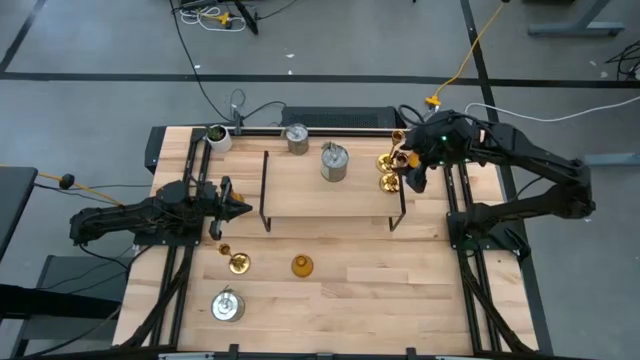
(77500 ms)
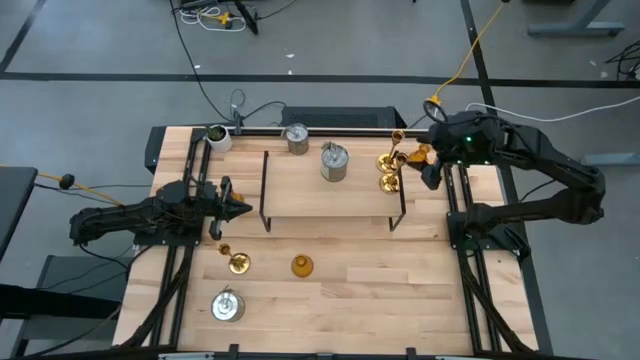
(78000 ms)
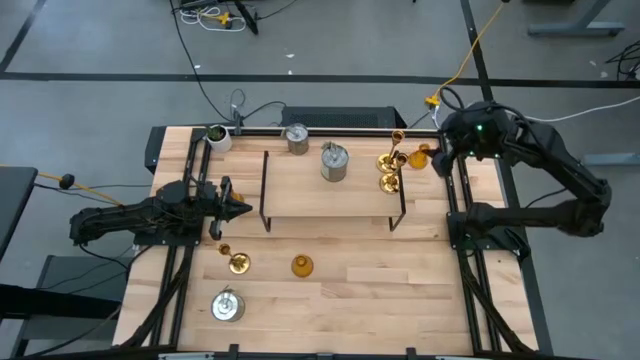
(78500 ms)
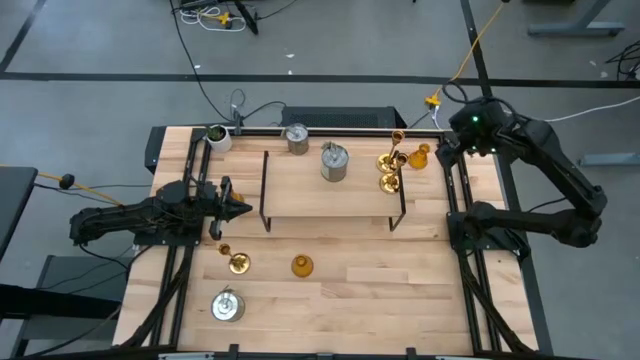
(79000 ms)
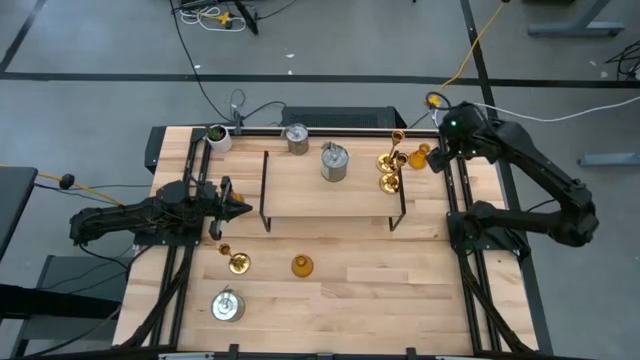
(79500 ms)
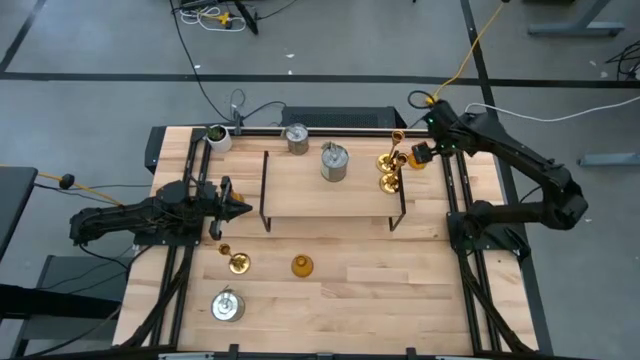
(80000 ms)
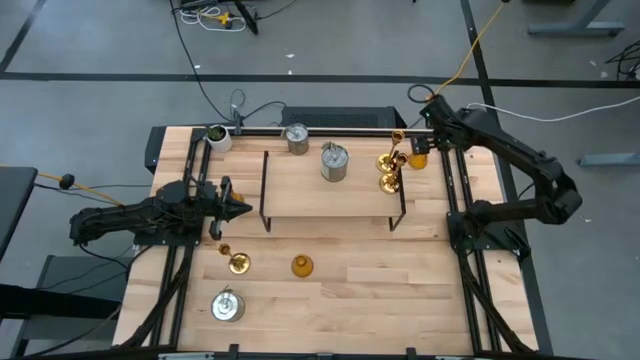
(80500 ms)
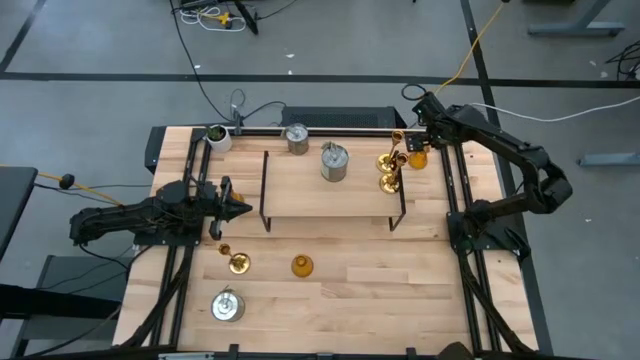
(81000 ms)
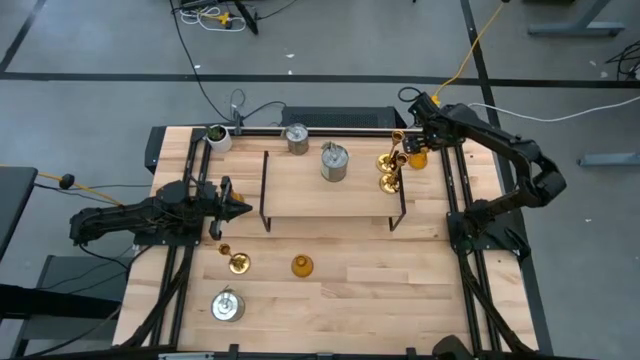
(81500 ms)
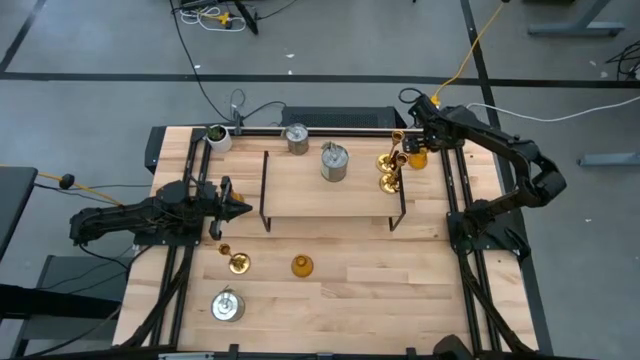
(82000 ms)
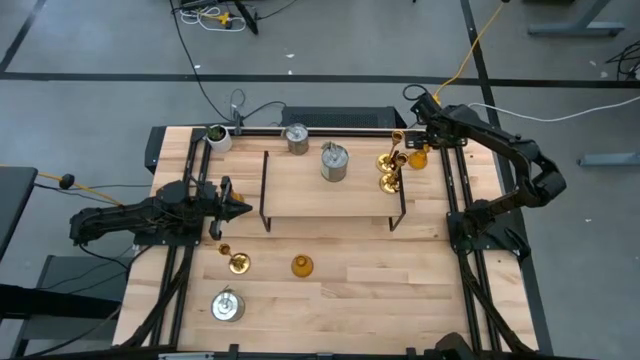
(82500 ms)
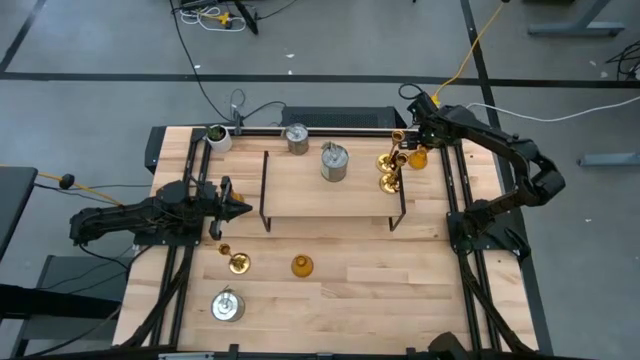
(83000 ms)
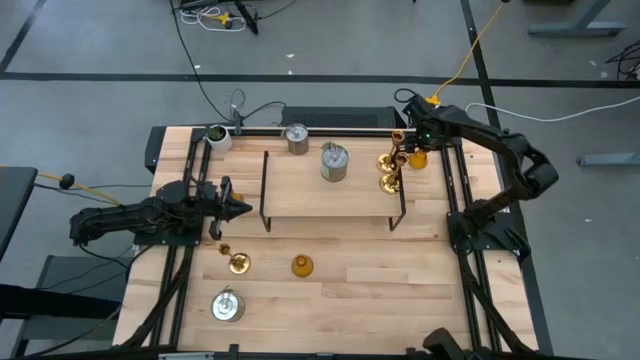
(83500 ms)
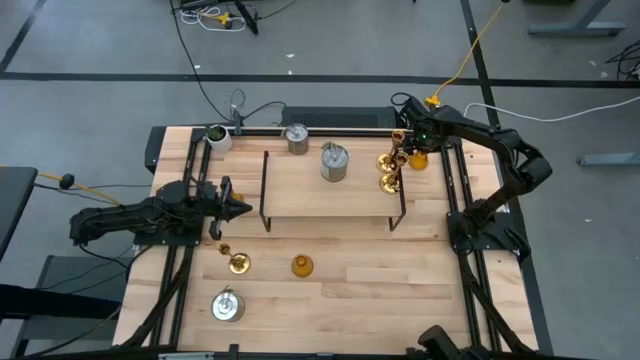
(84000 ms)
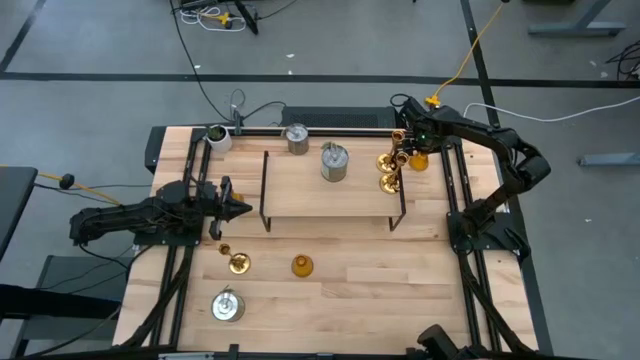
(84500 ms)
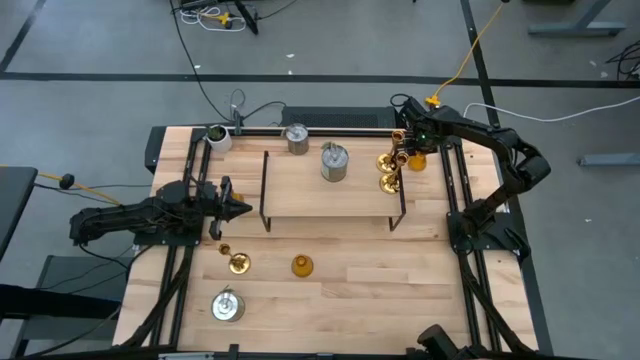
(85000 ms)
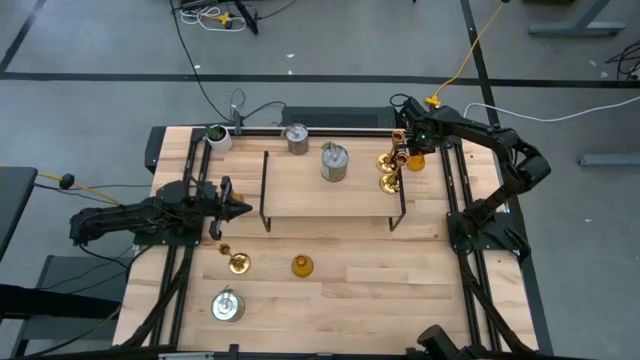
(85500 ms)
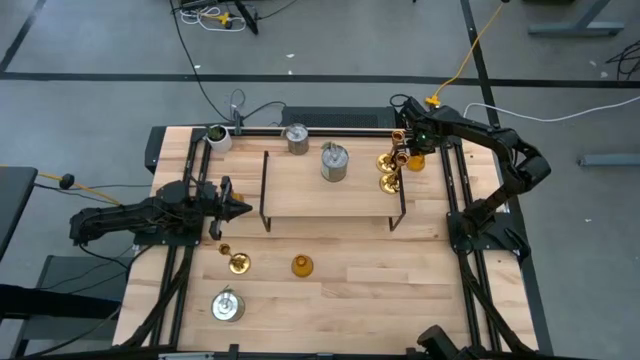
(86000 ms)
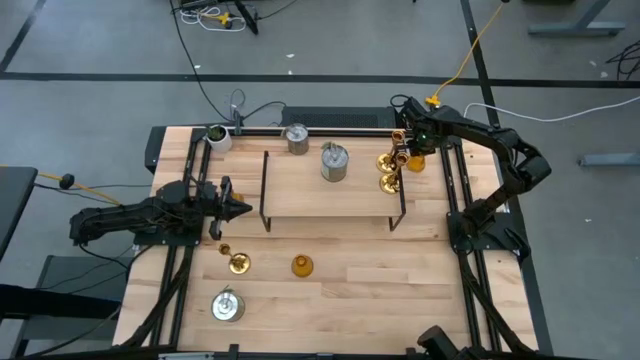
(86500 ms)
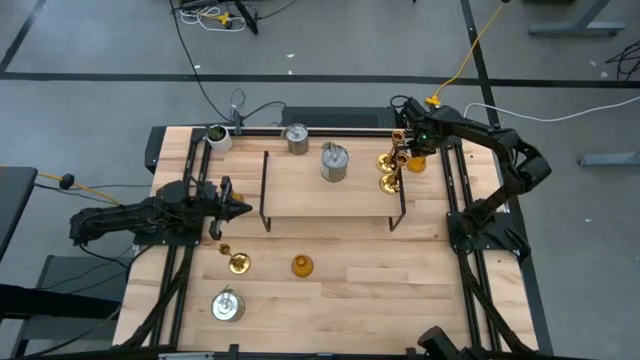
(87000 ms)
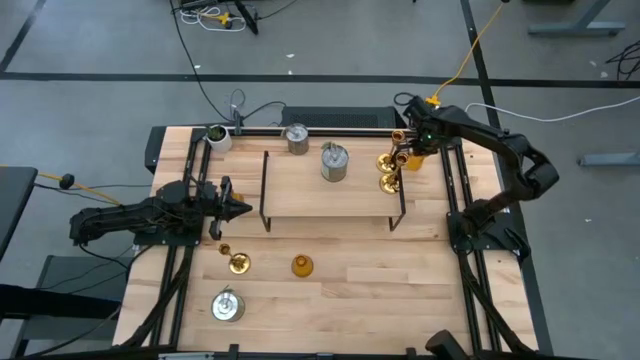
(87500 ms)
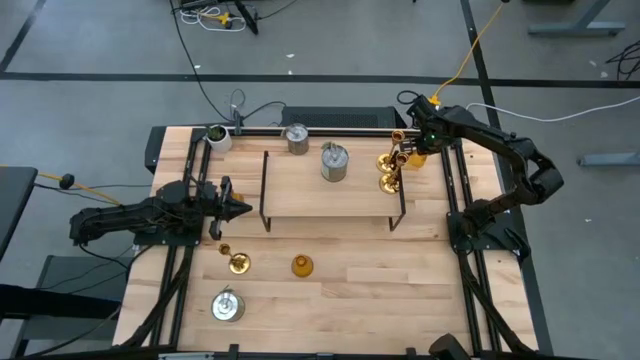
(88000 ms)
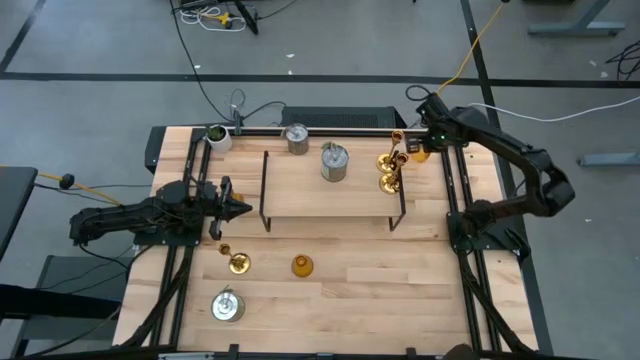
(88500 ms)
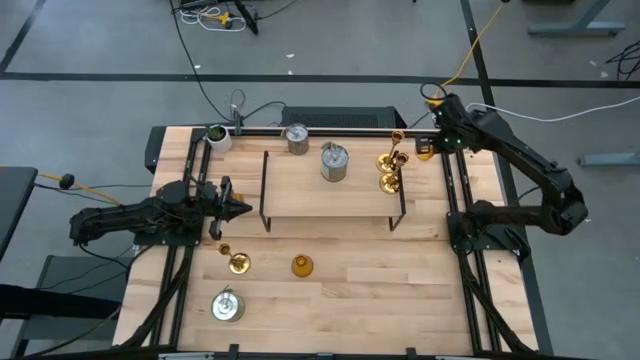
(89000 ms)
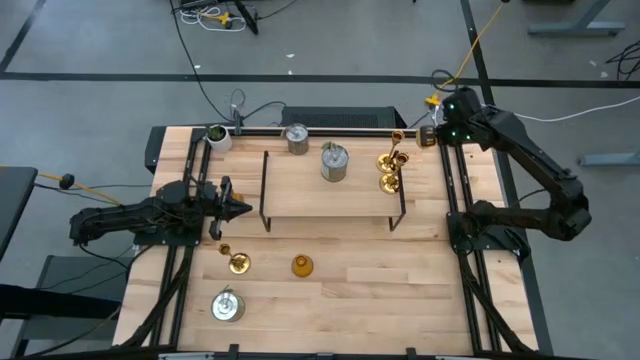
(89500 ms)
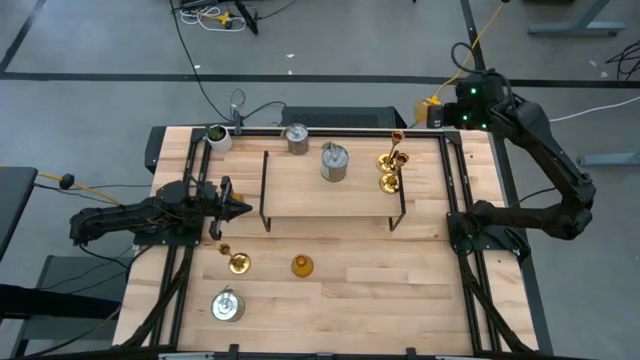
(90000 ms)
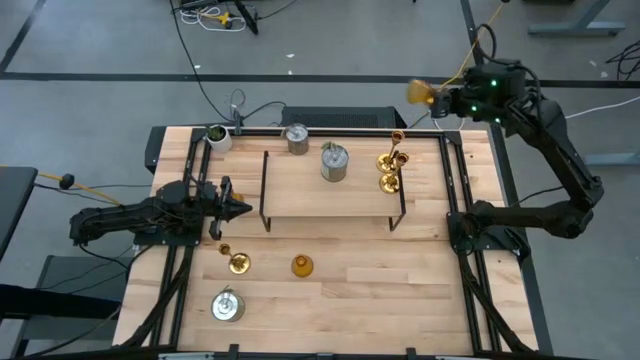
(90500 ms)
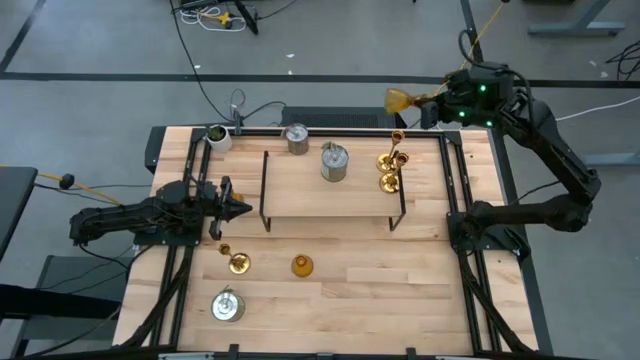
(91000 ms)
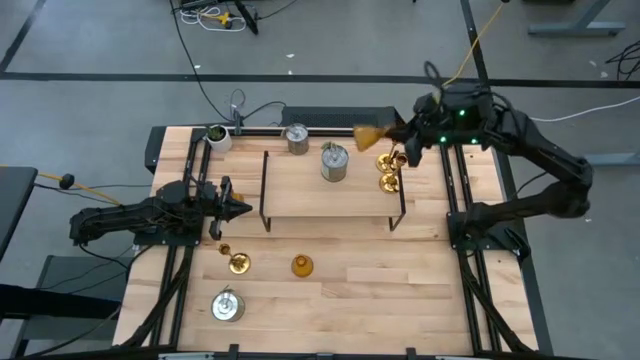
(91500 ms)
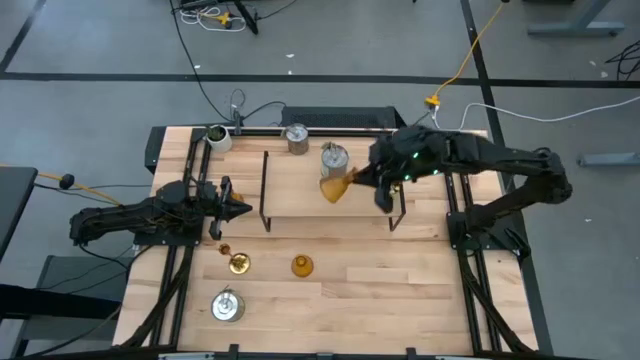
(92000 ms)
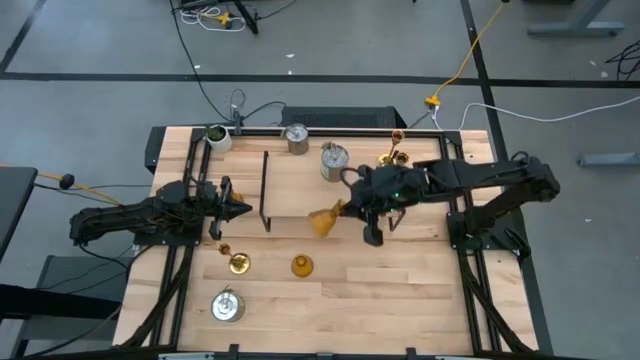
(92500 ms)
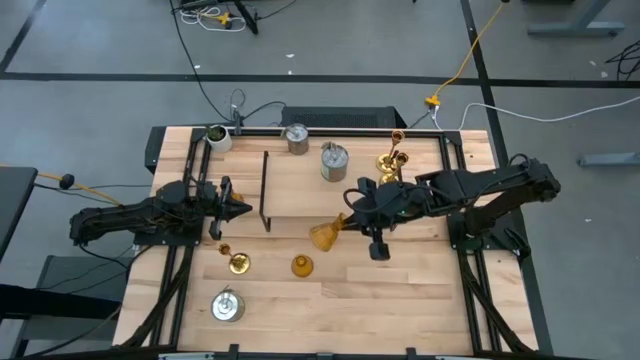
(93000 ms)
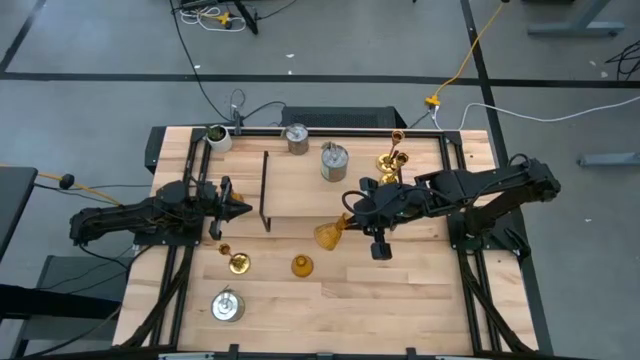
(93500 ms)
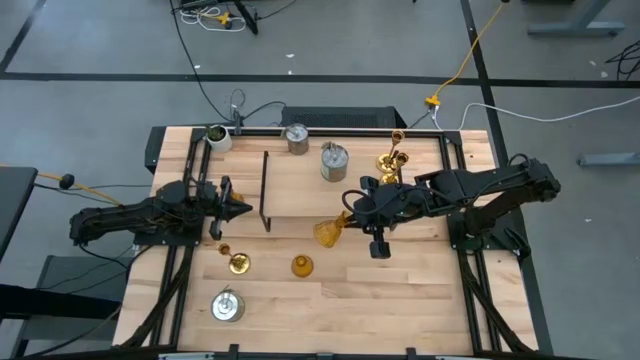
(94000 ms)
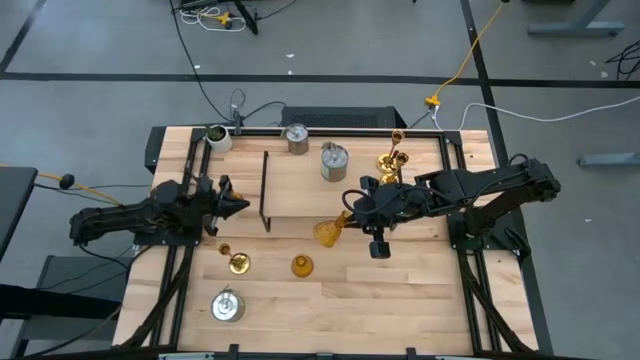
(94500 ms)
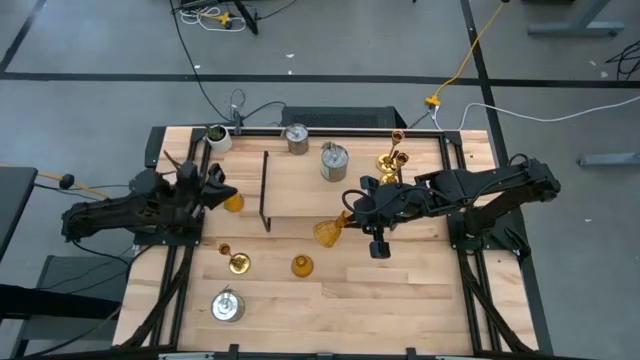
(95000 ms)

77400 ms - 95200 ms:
Task: Pick & Place candle stick holders
Put the top glass candle holder on the shelf

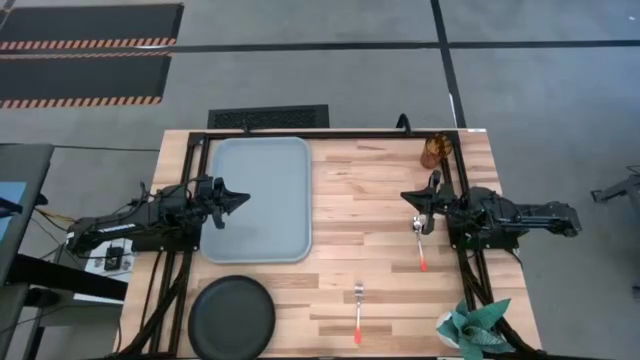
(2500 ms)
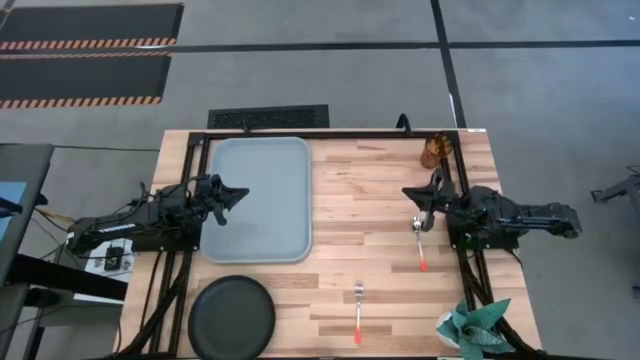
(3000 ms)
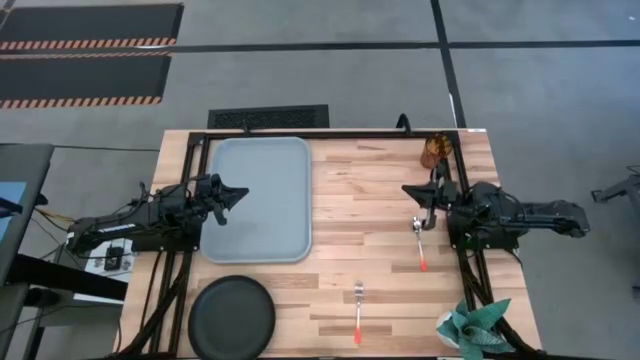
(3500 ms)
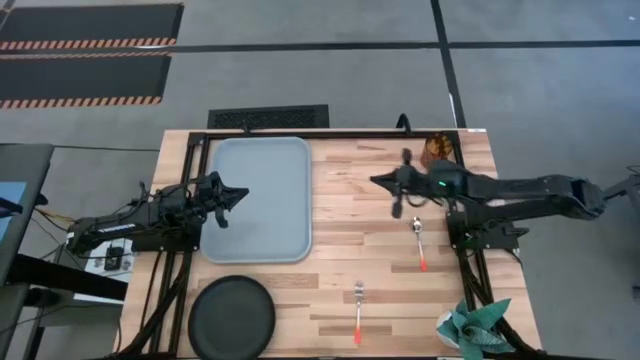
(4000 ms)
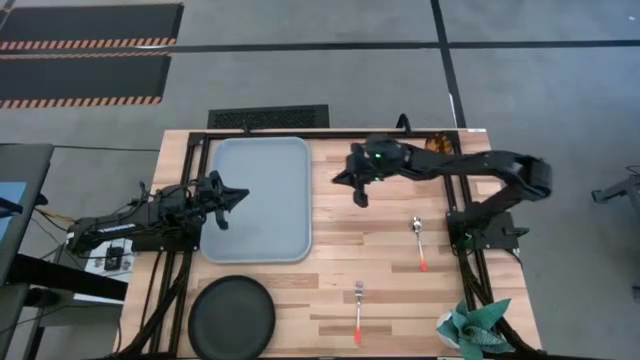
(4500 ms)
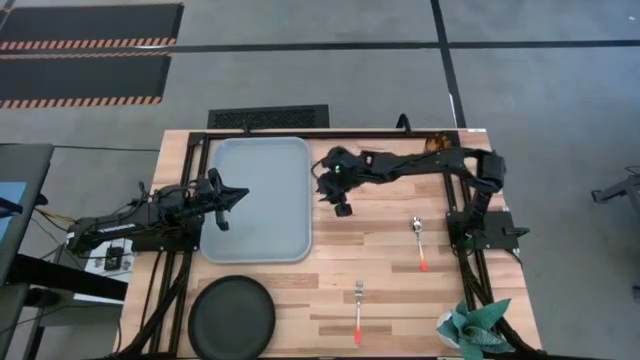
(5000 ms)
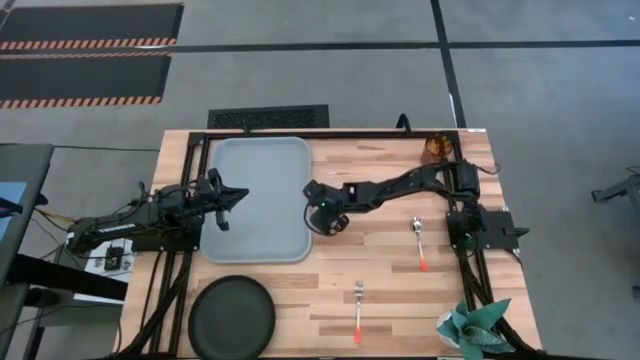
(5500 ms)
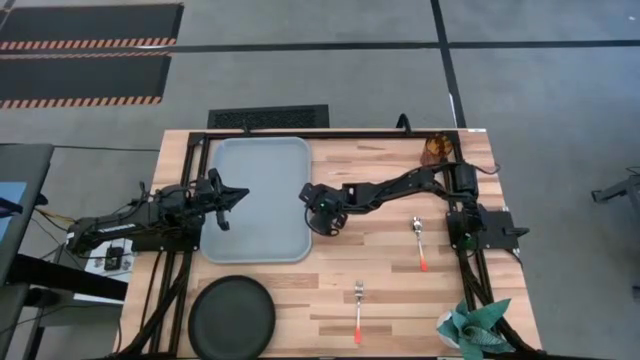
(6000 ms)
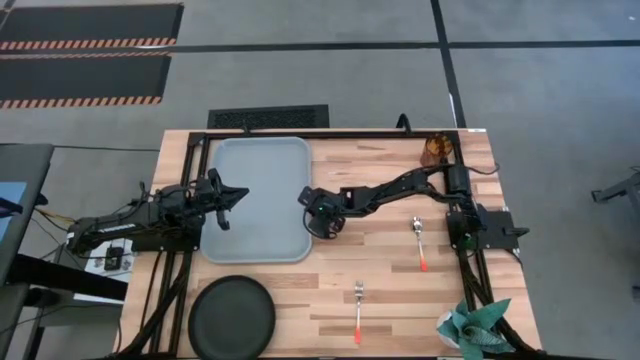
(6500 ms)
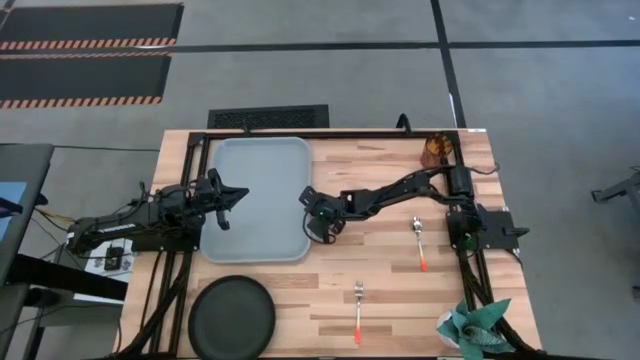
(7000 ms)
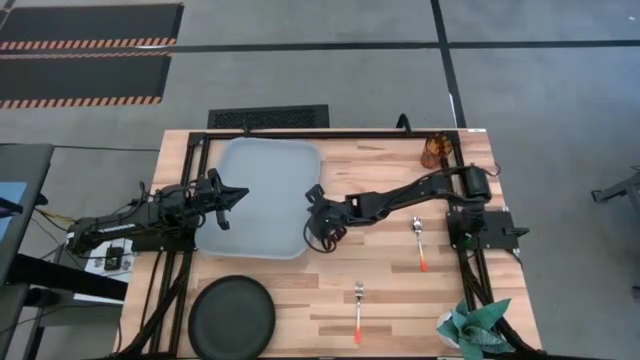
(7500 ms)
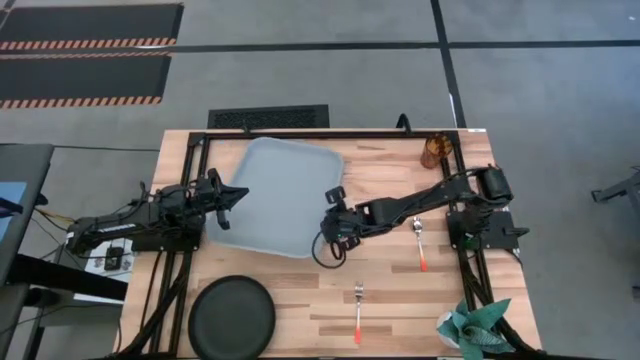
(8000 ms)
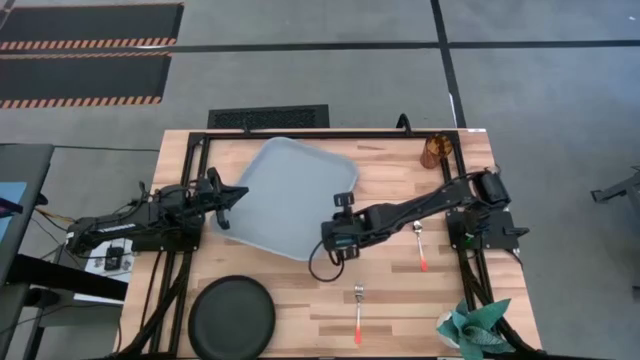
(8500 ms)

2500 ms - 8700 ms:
Task: Pick and place plate/cup/fork/spoon on tray
Prepare the gray serving tray
